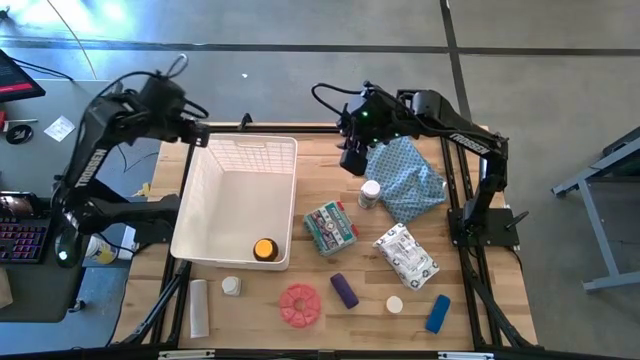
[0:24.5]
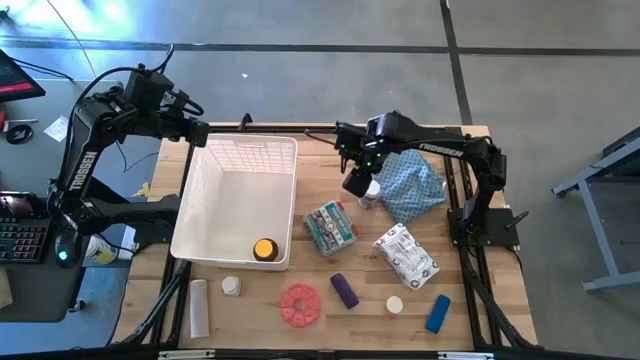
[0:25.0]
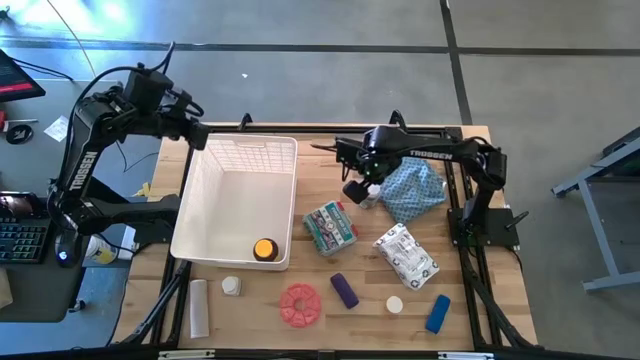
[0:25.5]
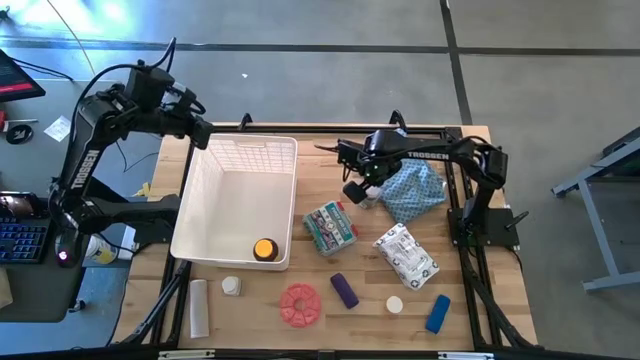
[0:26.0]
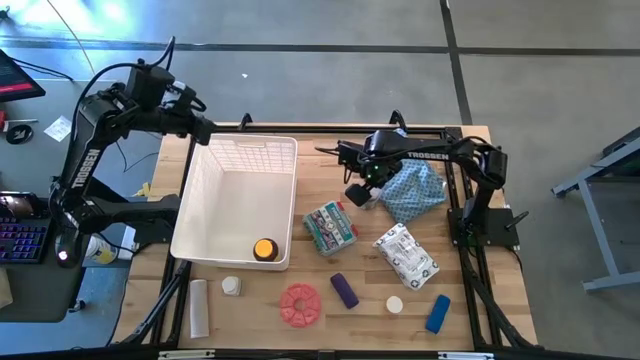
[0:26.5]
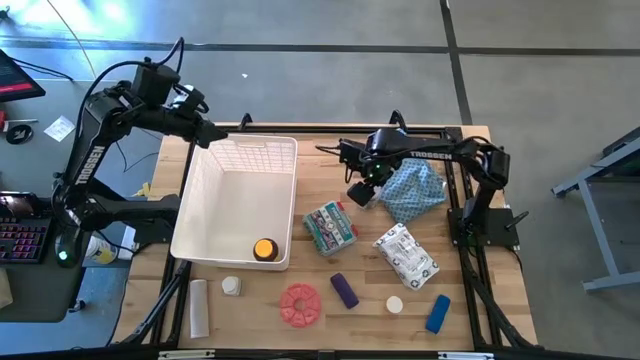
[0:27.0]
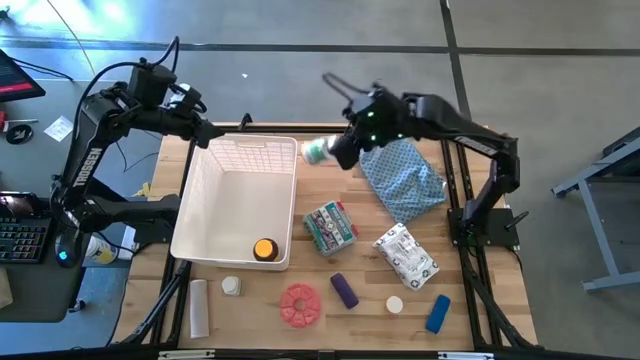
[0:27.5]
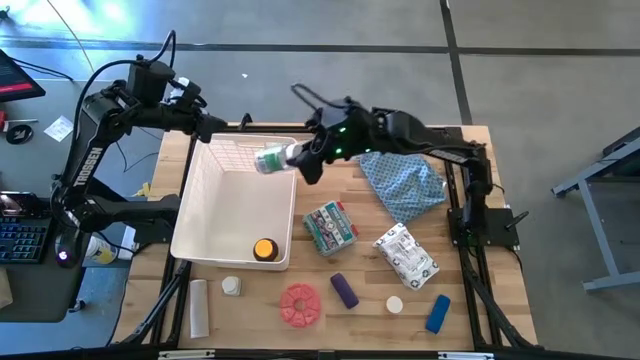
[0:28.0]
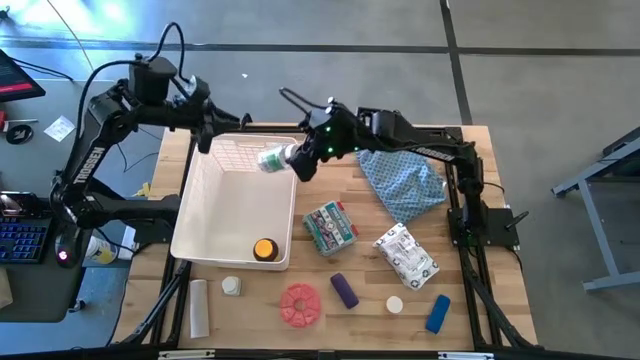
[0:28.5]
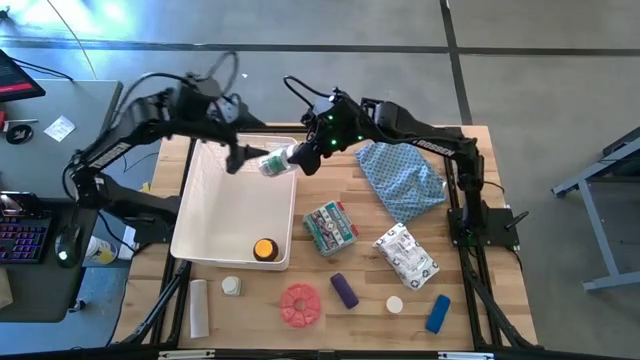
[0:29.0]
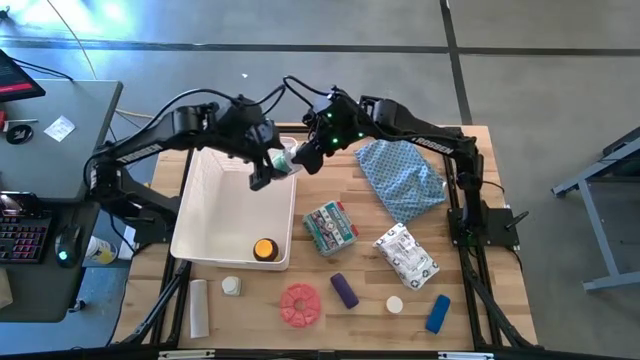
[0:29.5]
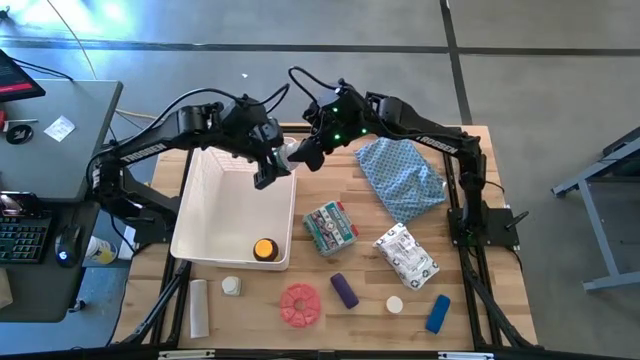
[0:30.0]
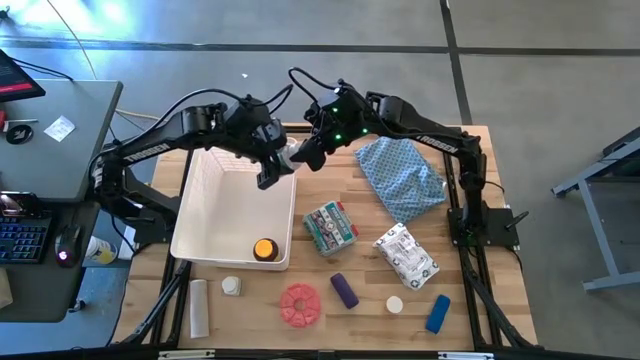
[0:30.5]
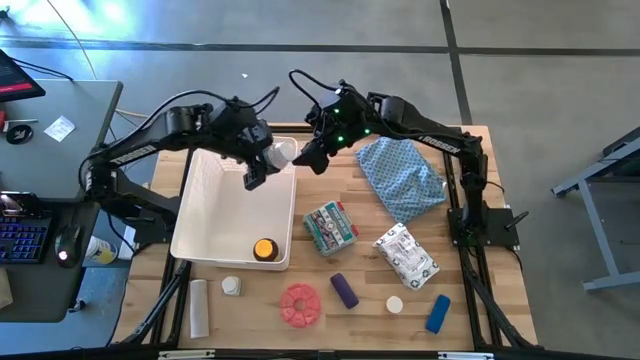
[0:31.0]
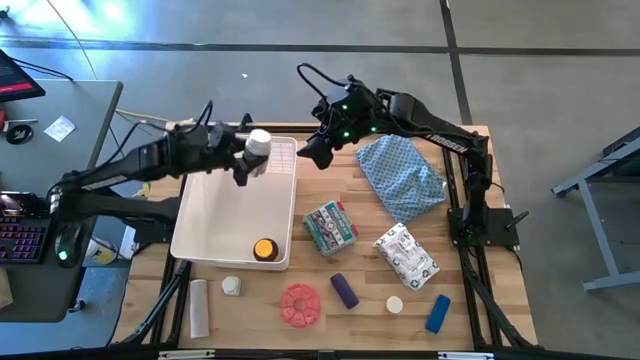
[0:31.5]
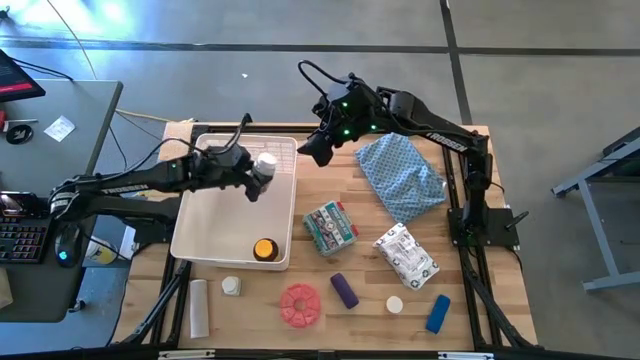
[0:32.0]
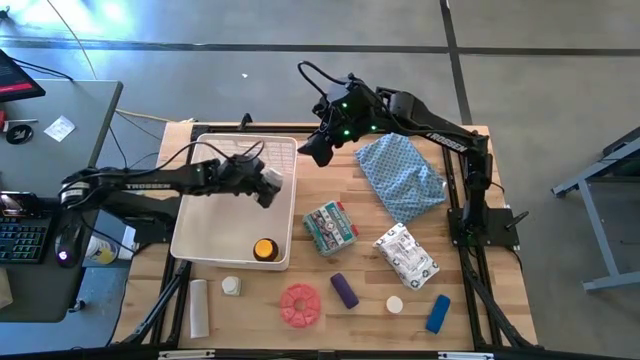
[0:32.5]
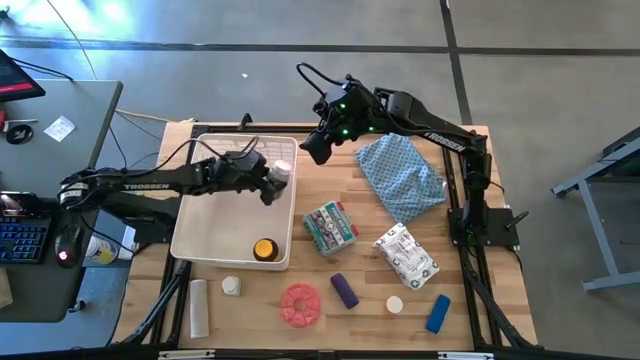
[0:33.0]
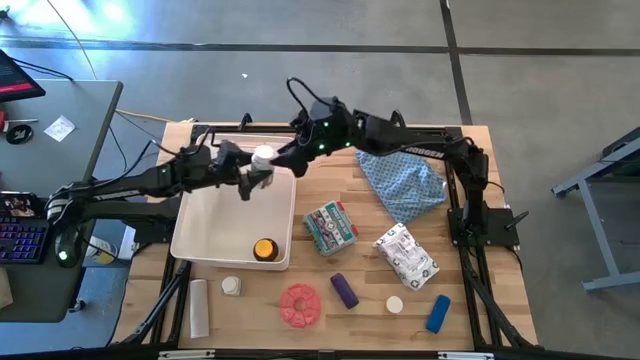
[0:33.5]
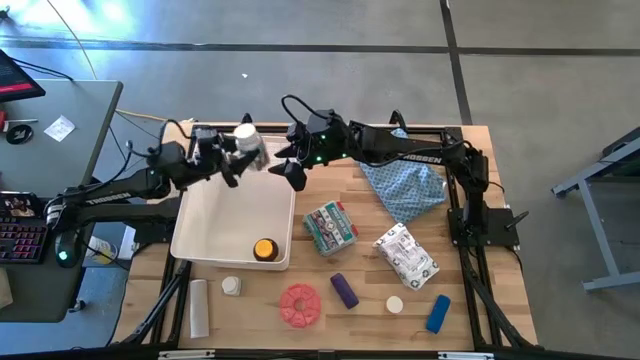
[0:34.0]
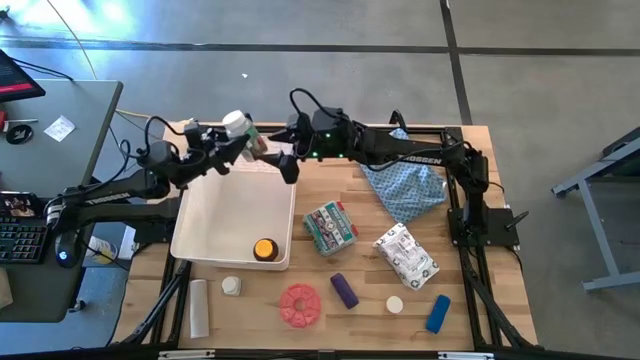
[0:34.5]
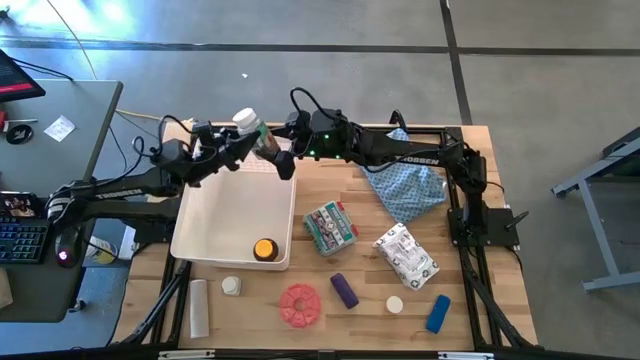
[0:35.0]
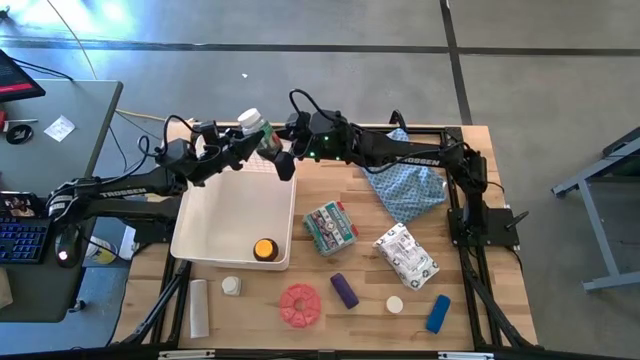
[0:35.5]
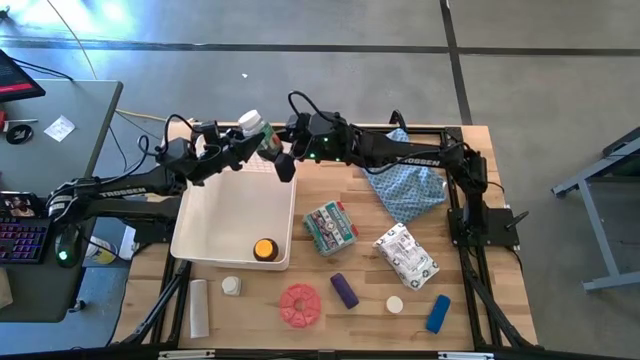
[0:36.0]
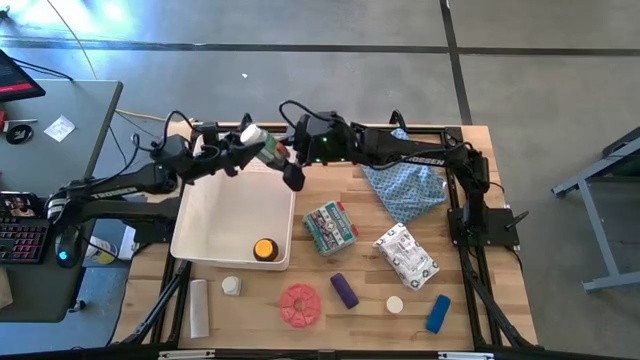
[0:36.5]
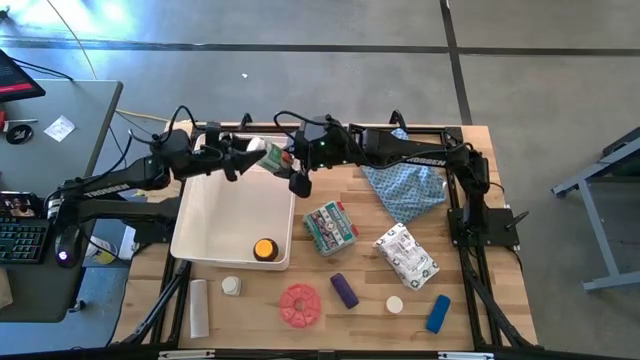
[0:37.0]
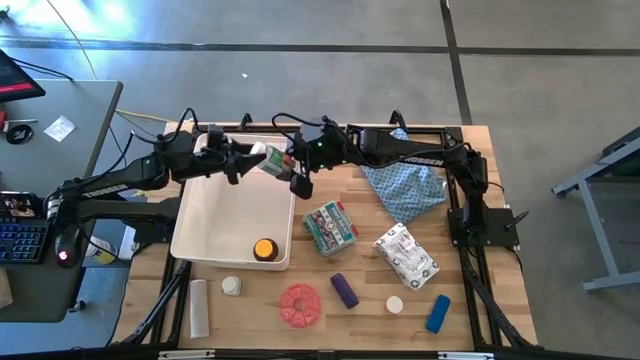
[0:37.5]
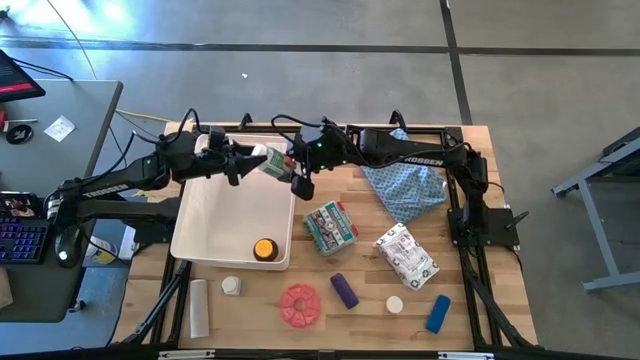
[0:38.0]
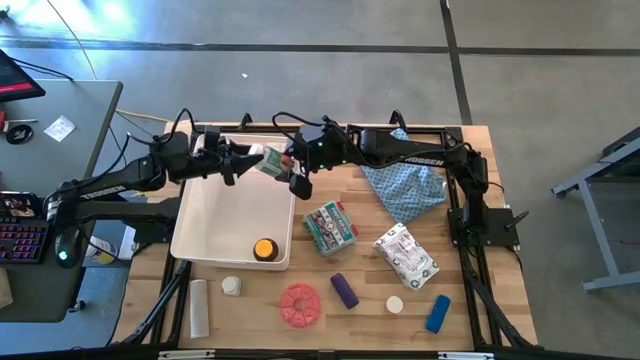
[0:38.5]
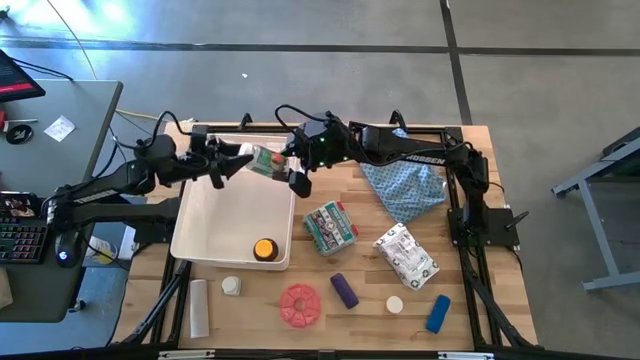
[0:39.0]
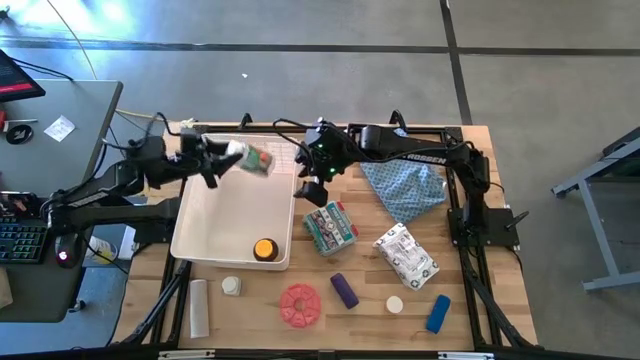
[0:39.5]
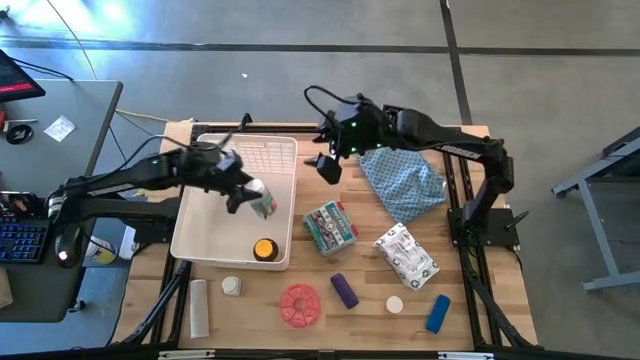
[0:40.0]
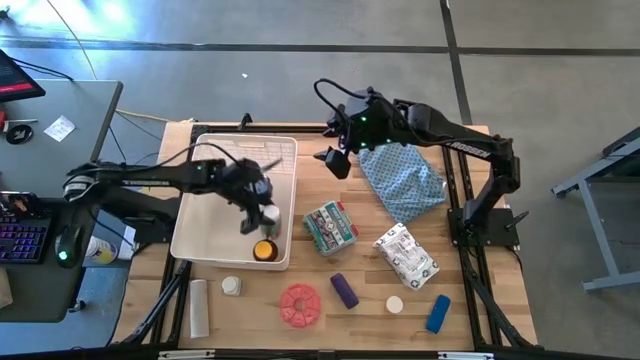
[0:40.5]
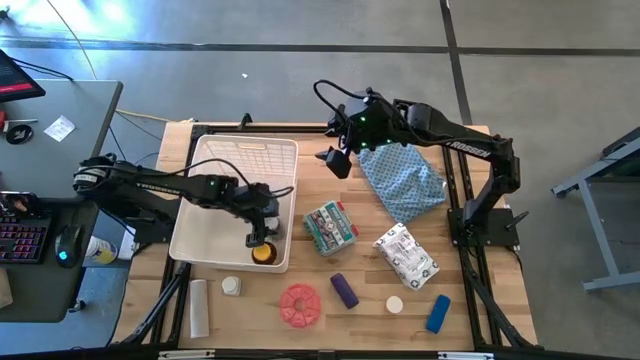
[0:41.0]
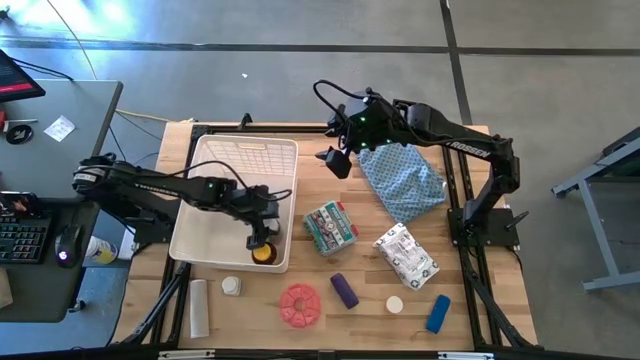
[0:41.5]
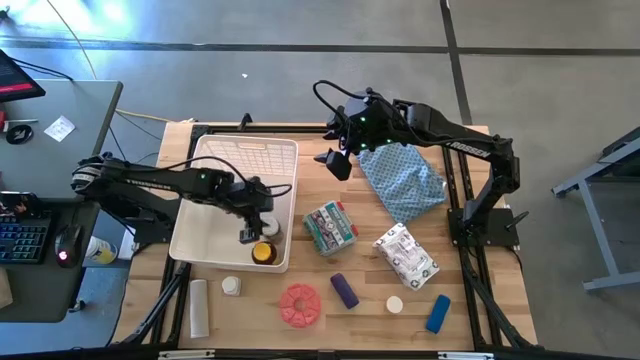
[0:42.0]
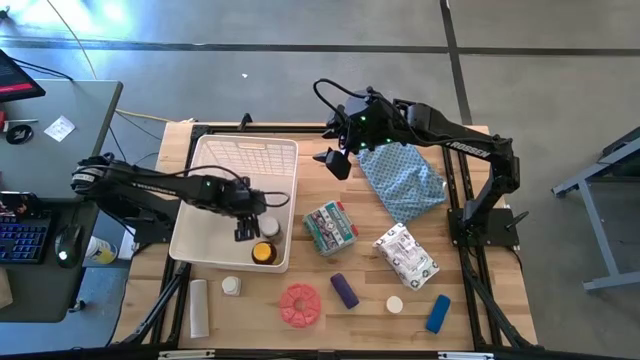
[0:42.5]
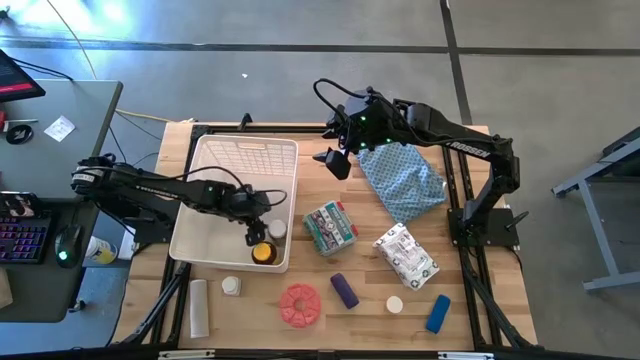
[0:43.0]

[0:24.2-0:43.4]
Task: Pick & place medical supplies in basket/bin
Put the green medicine bottle into the white bin

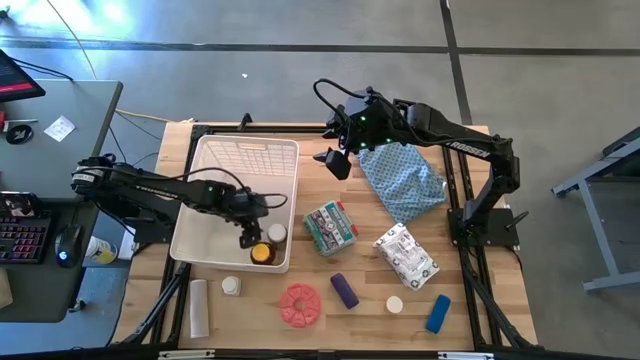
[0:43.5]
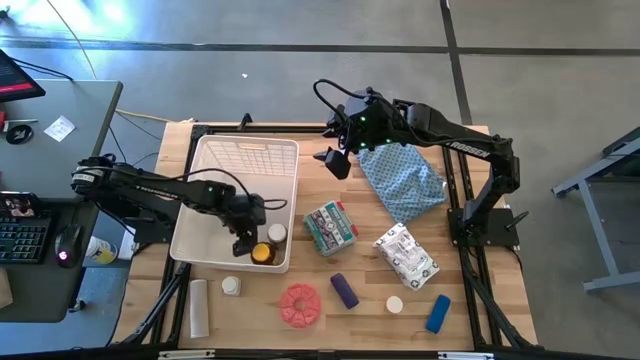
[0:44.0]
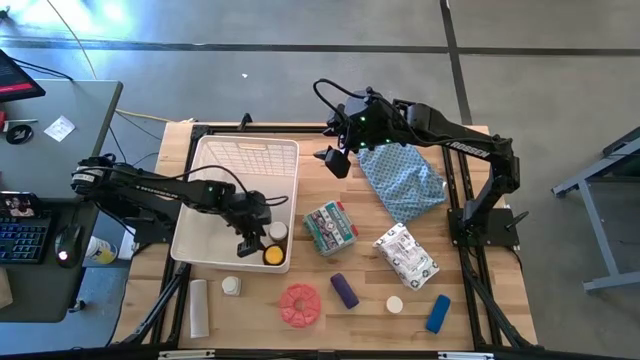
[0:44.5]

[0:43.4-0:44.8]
Adjust the yellow medicine bottle in the bin

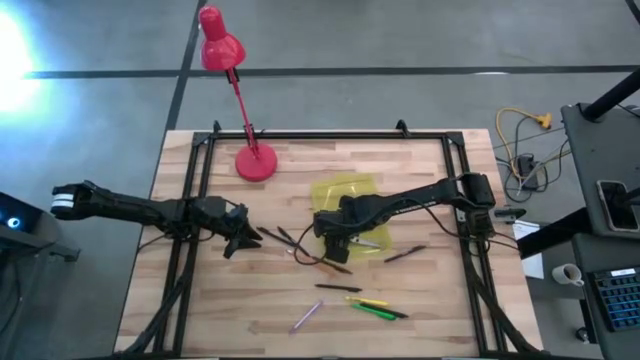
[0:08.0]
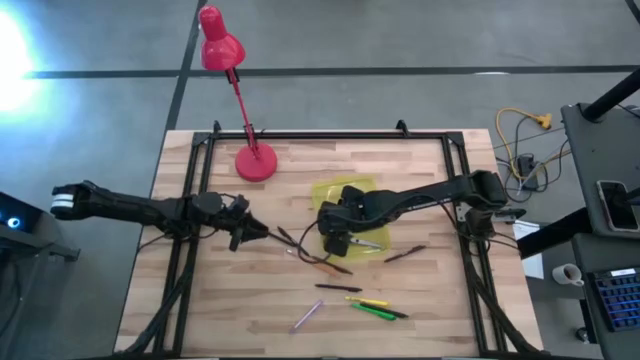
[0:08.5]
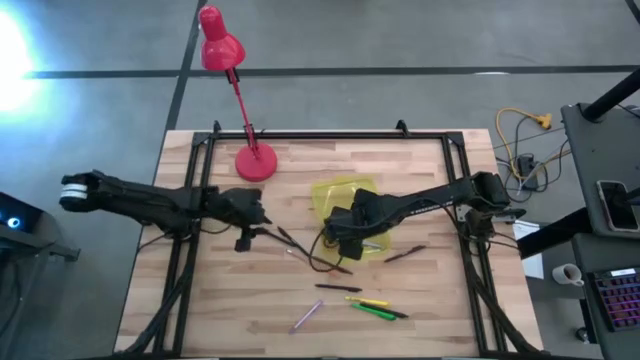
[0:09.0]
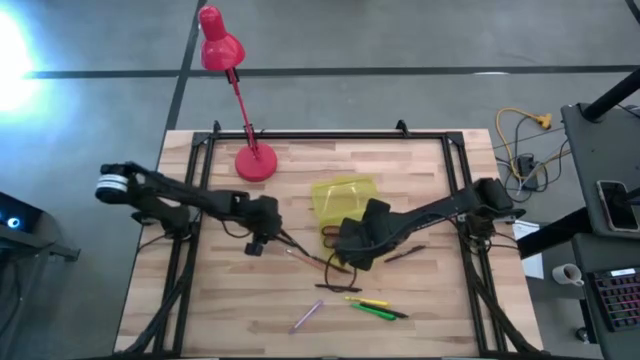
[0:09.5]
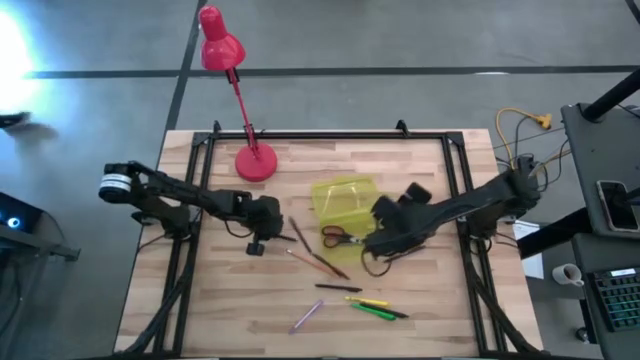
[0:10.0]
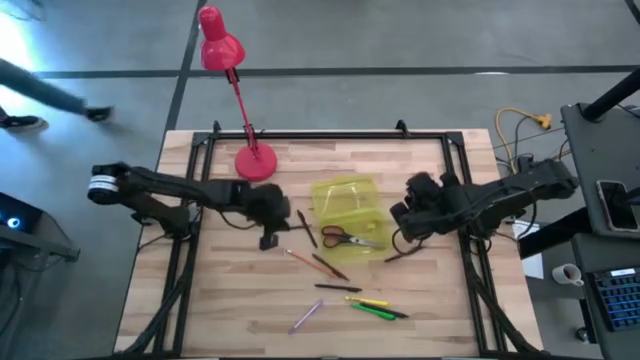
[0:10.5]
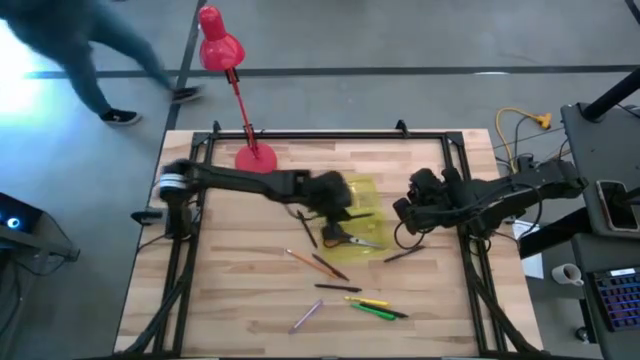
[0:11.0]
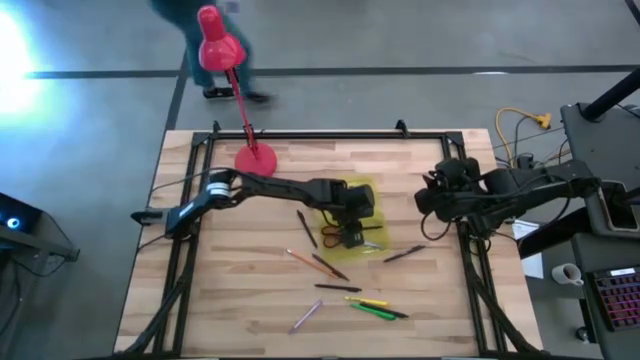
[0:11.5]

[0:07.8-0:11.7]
Task: Pick & place school supplies into a supply box
Put the black pen into the yellow supply box
